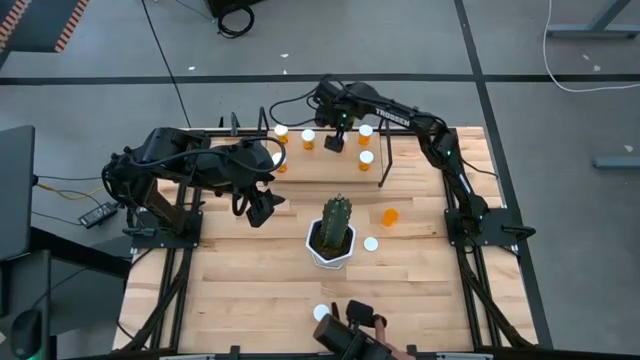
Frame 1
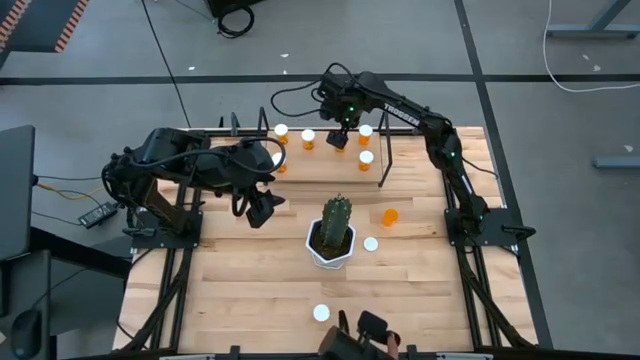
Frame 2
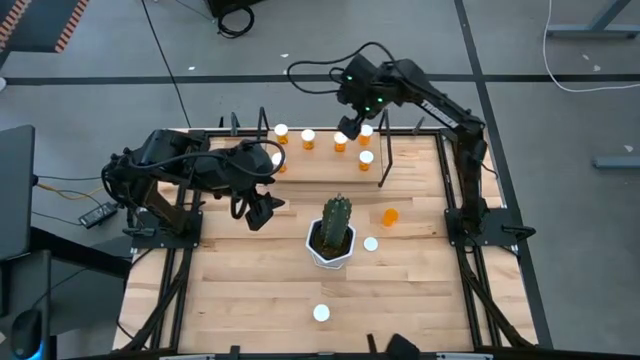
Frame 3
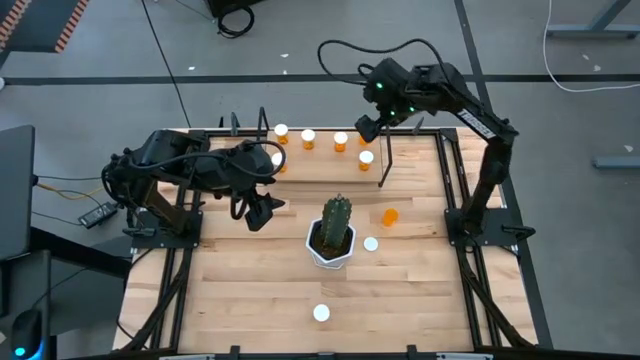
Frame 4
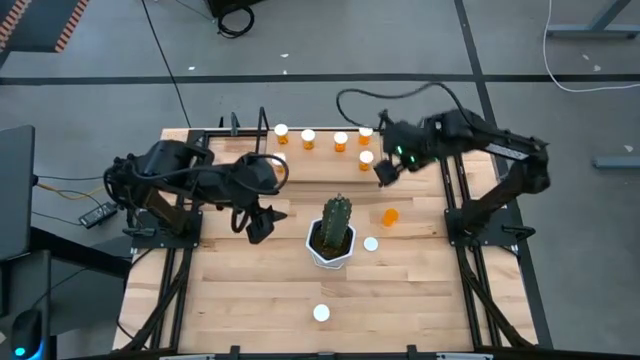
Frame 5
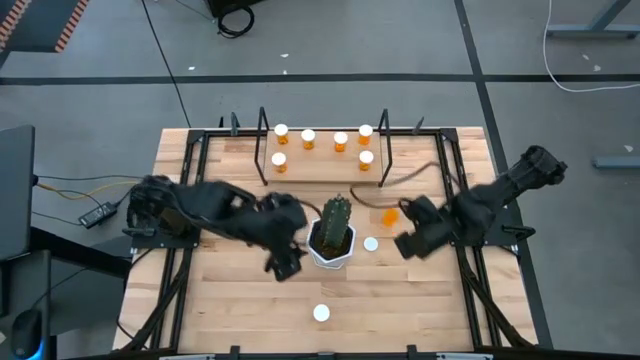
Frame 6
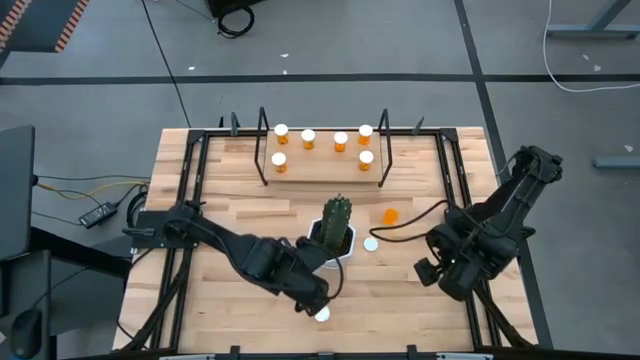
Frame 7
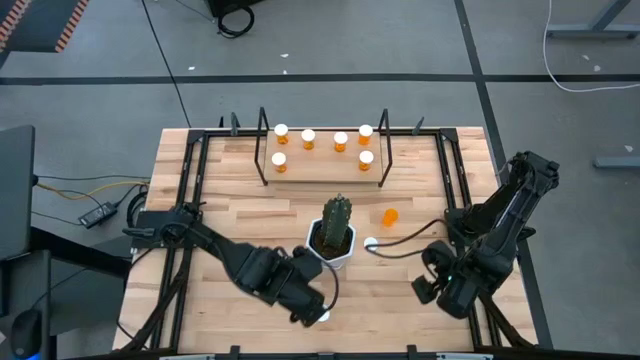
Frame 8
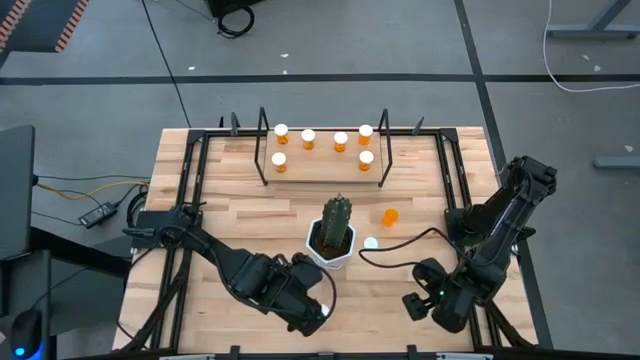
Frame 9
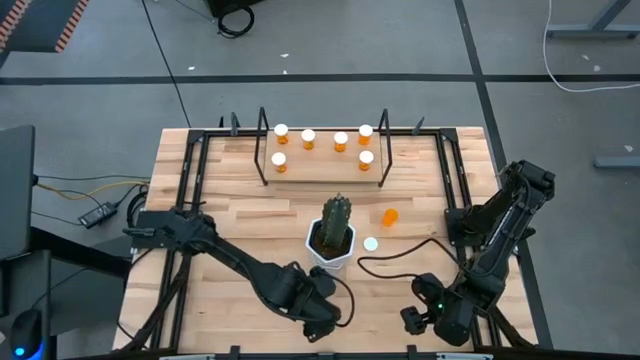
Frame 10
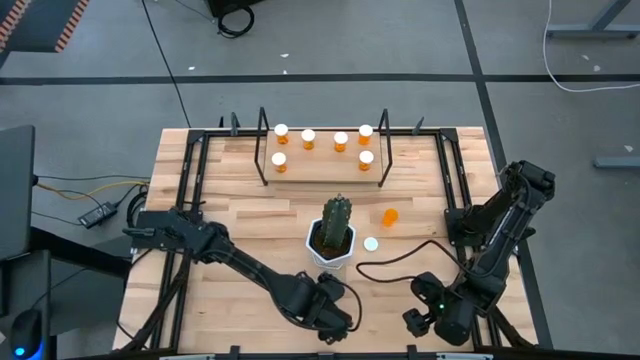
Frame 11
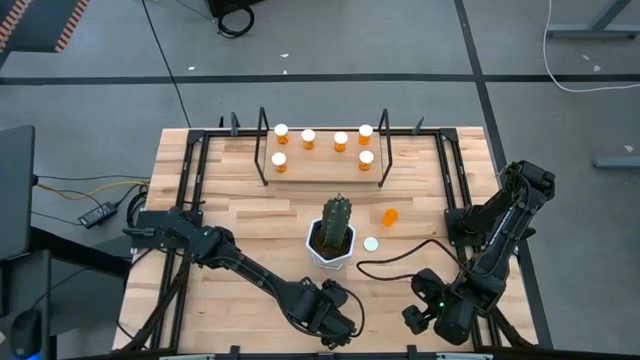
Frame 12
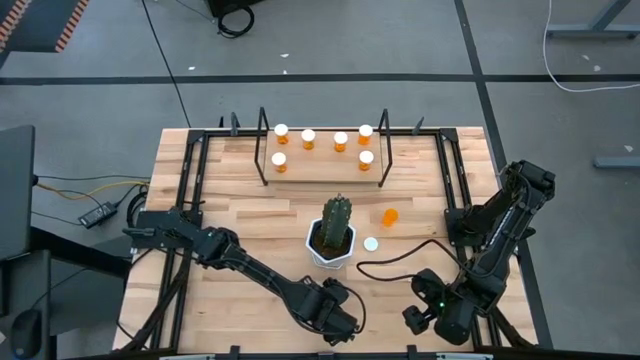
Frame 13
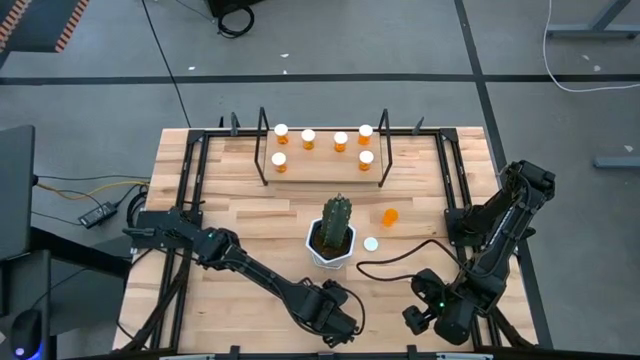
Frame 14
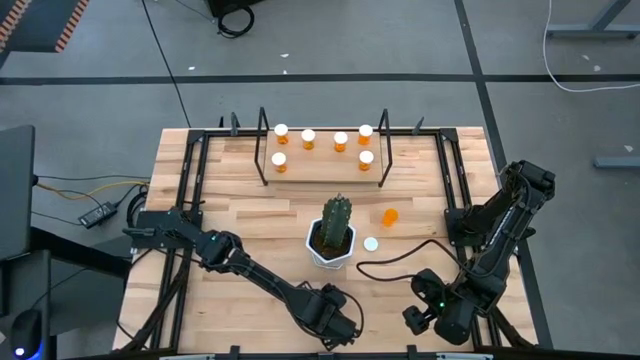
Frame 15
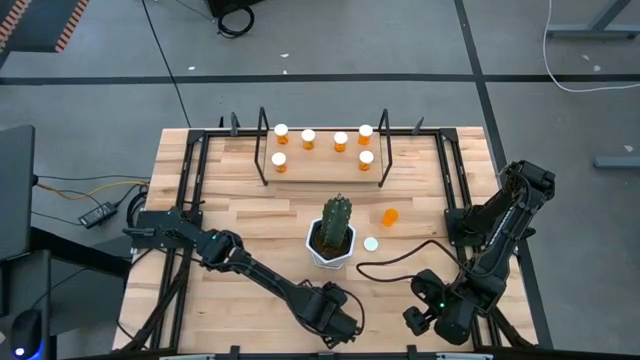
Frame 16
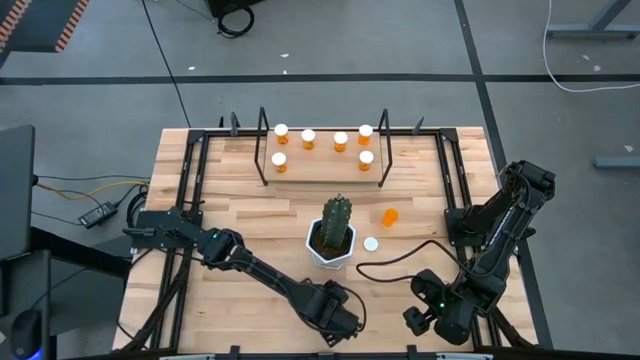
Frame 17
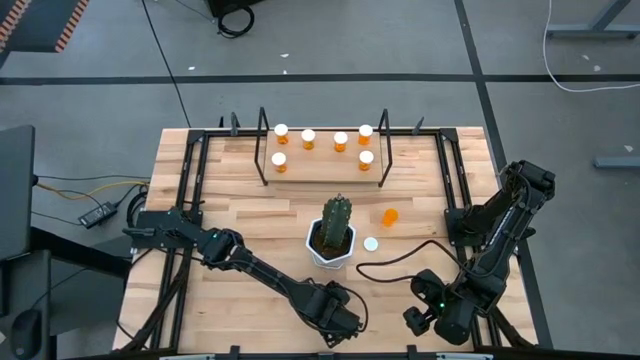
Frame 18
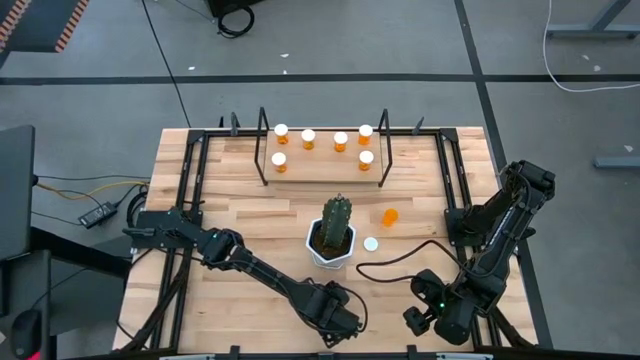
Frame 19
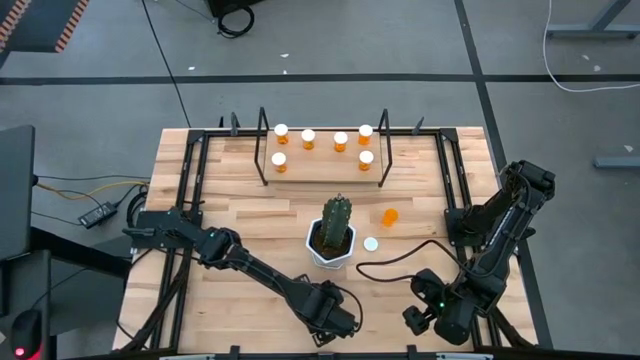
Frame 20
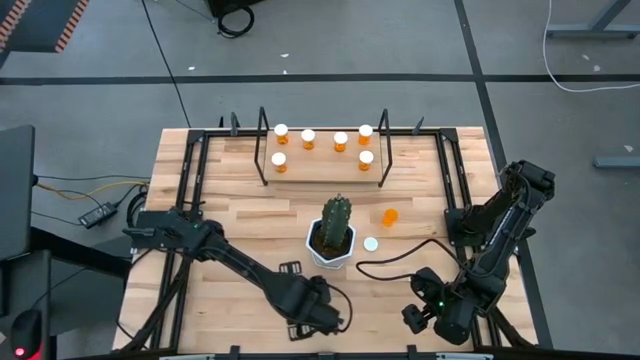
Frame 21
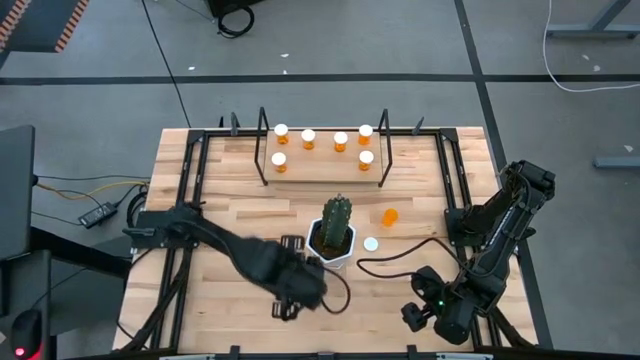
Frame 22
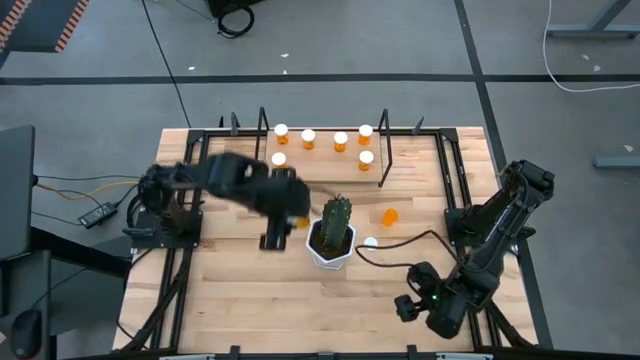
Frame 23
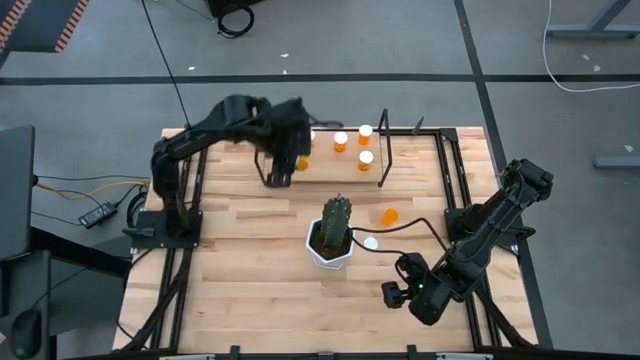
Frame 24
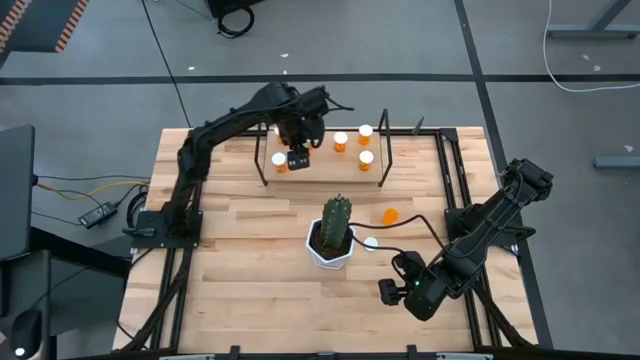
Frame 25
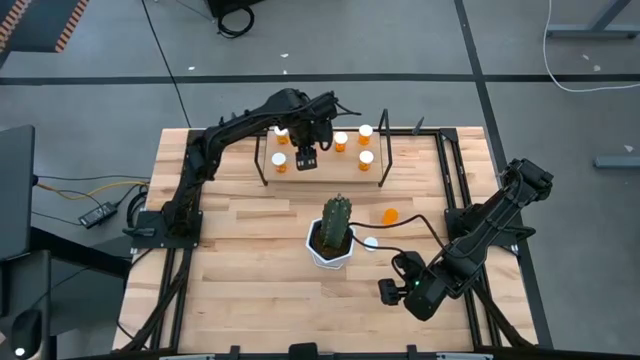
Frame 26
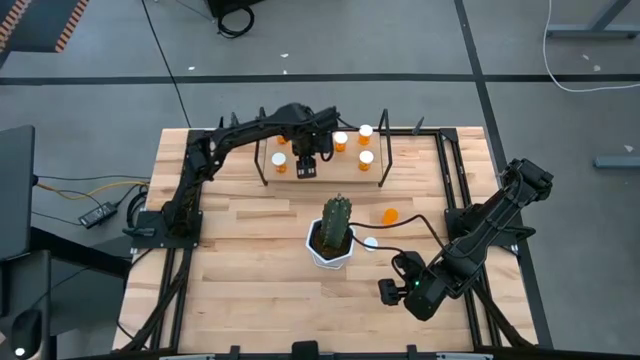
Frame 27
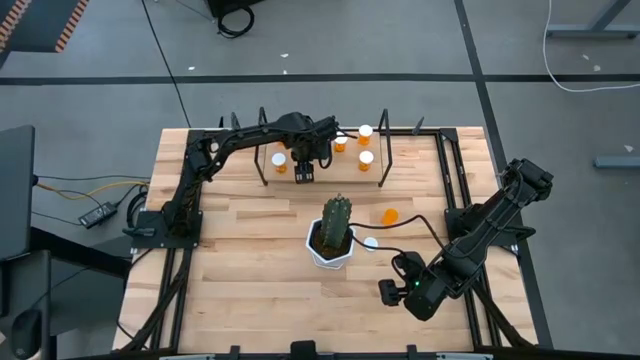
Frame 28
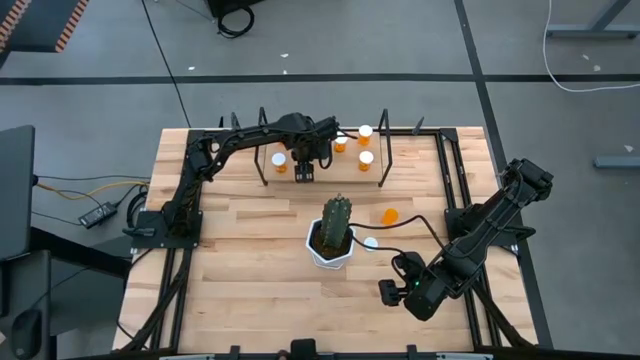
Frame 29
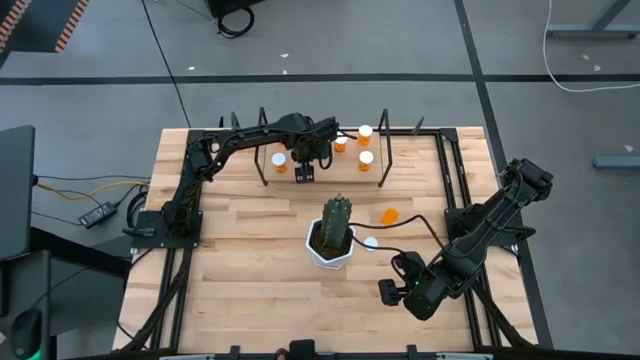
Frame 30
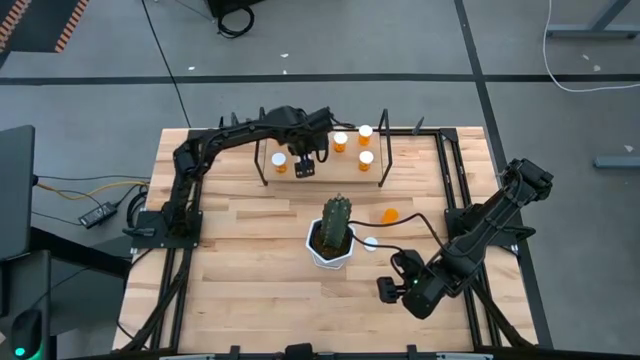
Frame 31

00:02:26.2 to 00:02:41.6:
Task: Pick and place medicine bottles onto shelf by color
Put the orange medicine bottle on the shelf

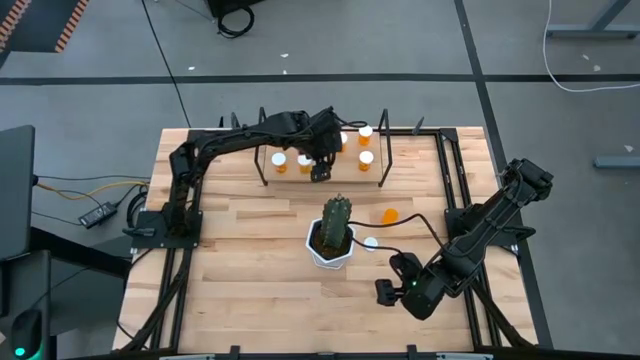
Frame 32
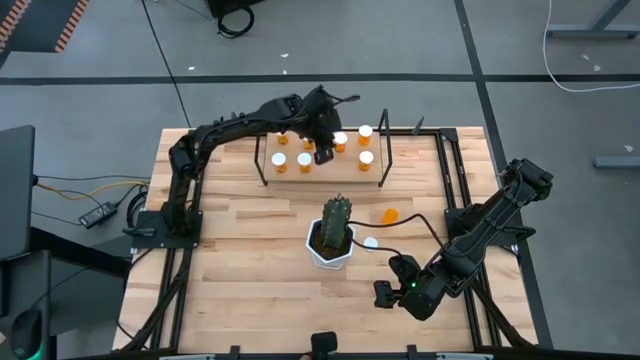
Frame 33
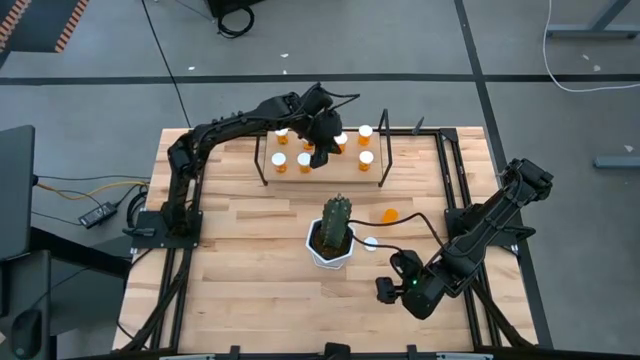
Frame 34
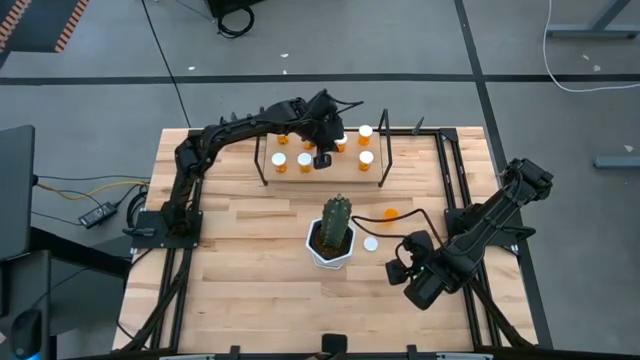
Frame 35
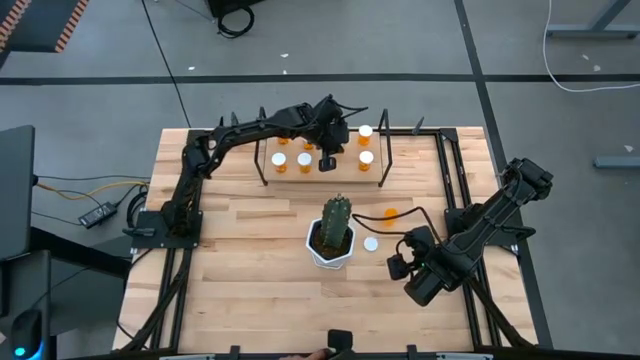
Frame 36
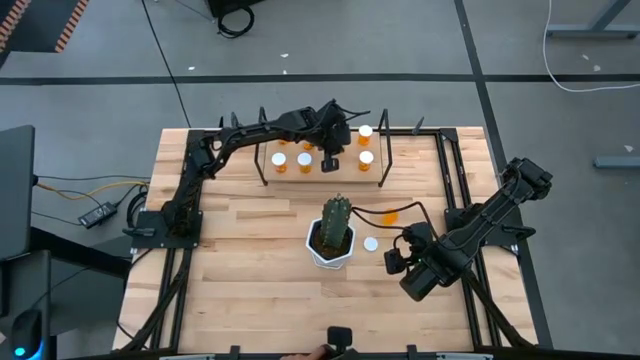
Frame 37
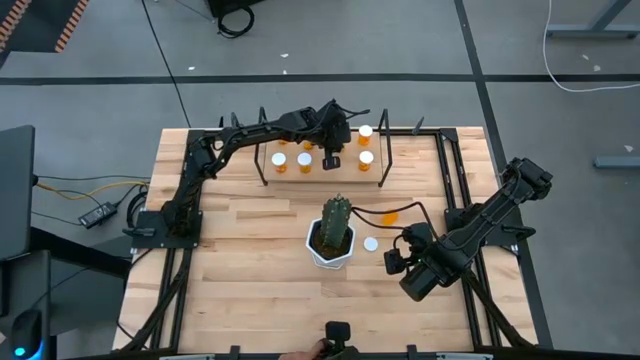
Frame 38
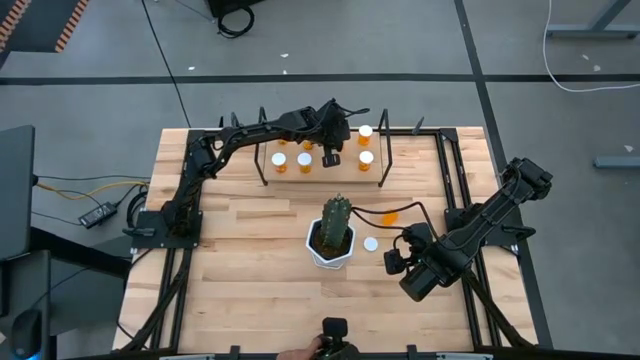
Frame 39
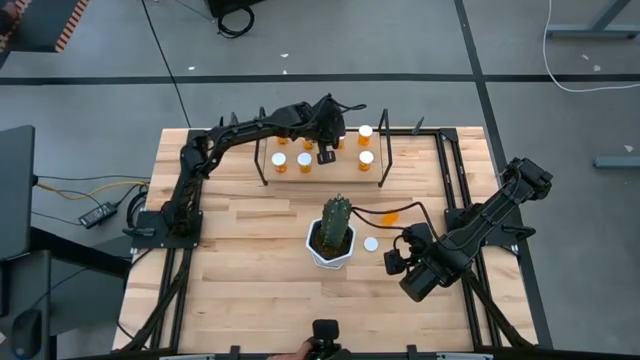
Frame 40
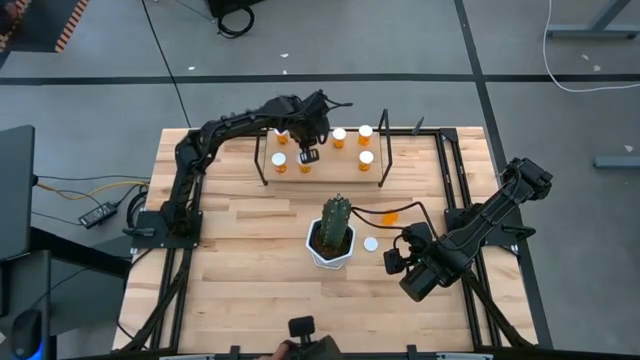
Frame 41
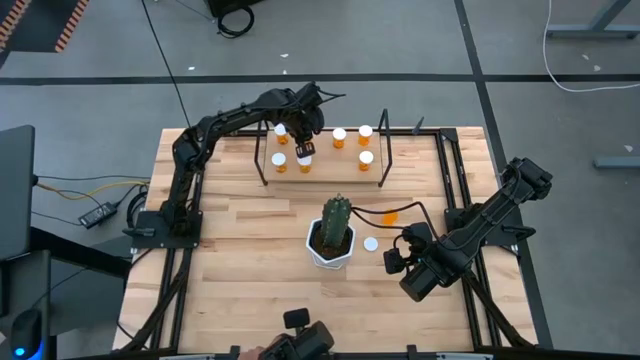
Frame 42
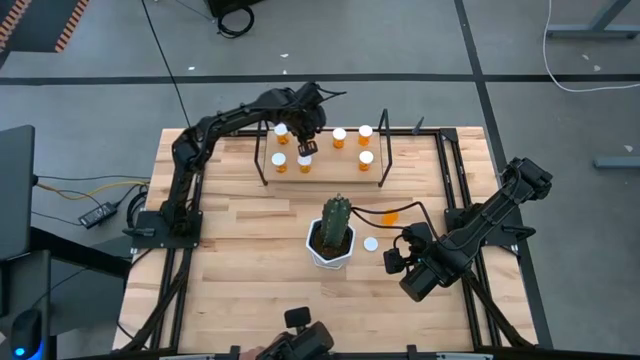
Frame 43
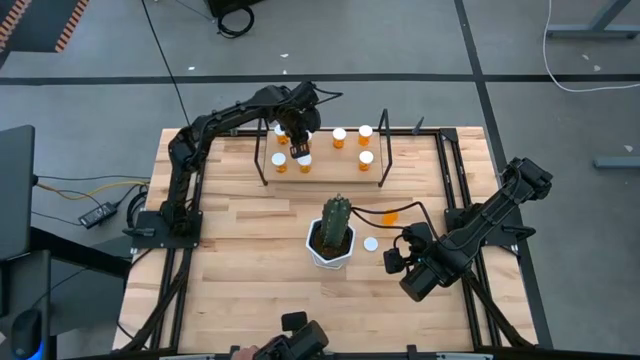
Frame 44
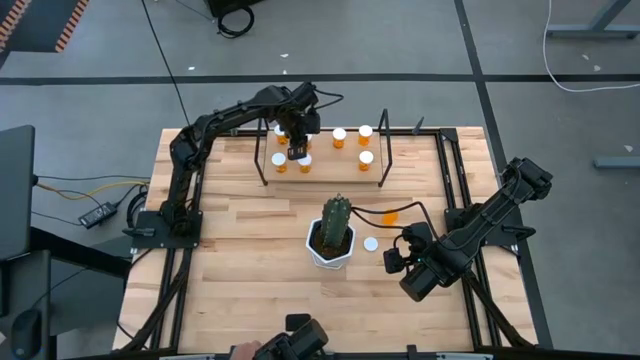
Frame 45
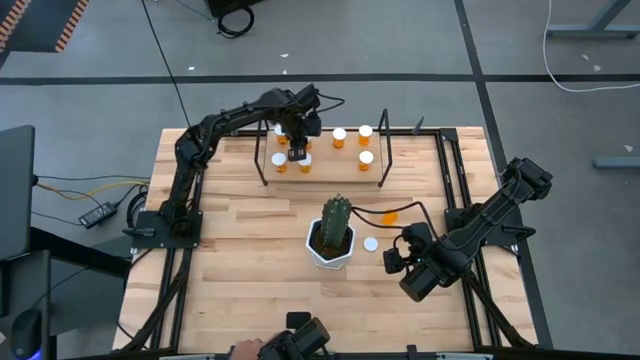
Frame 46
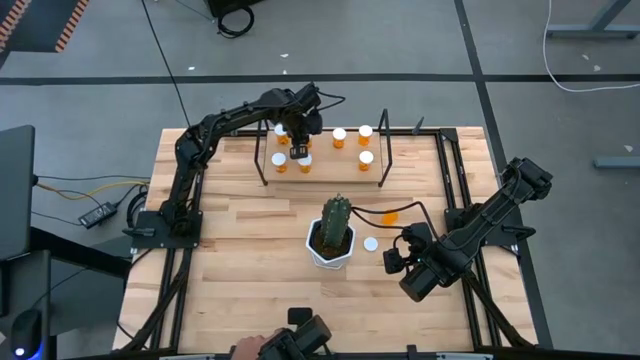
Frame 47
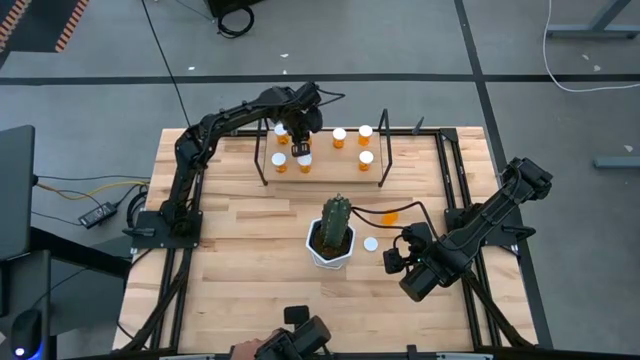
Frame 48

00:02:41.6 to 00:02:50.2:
Adjust the orange medicine bottles on the shelf
